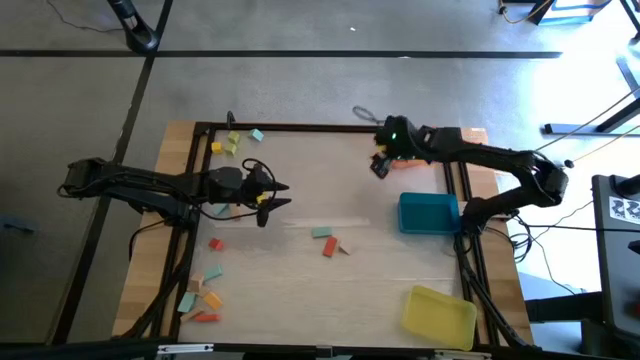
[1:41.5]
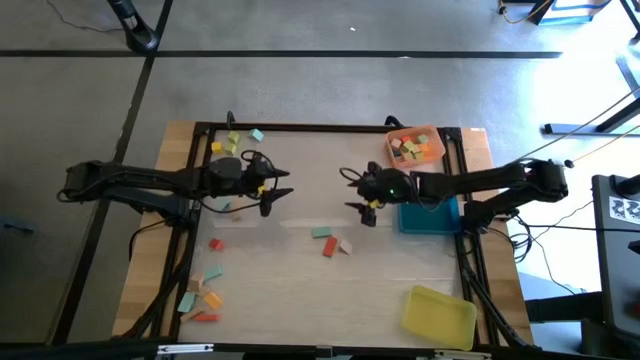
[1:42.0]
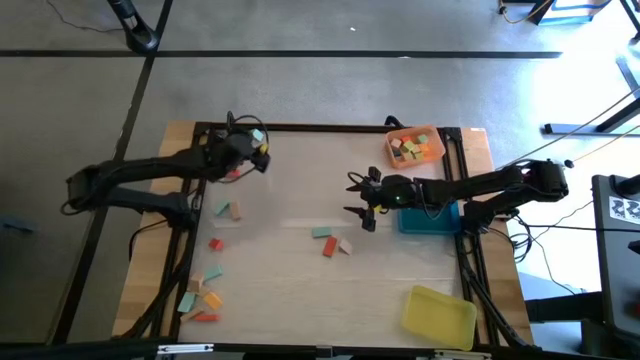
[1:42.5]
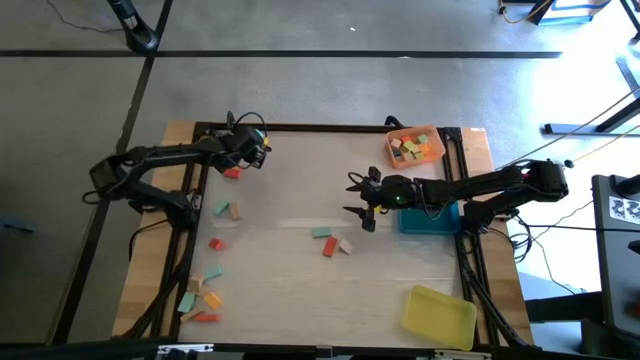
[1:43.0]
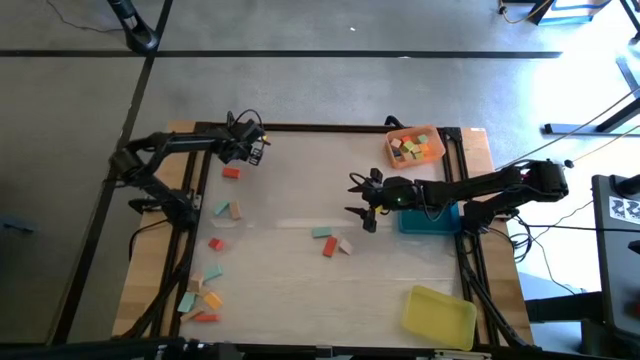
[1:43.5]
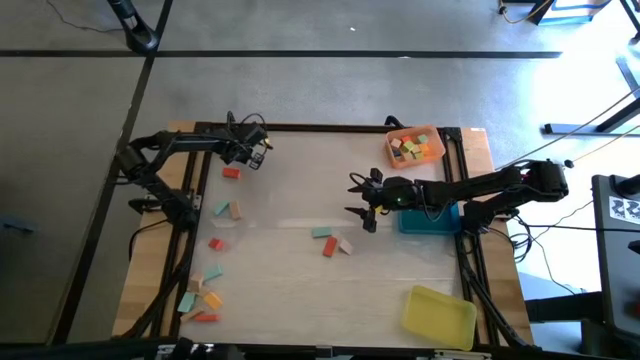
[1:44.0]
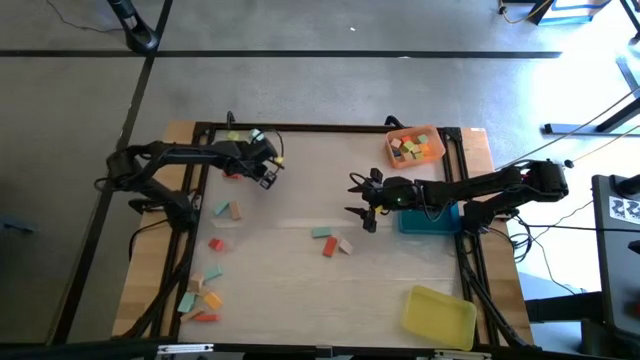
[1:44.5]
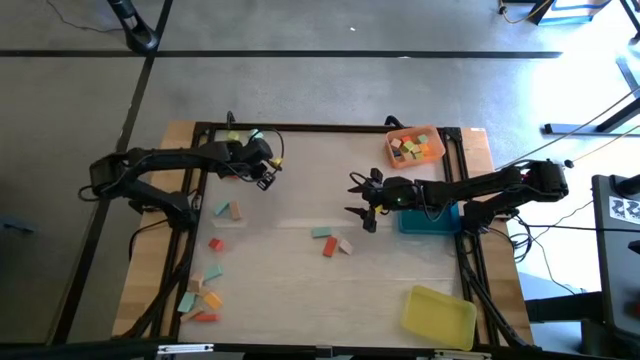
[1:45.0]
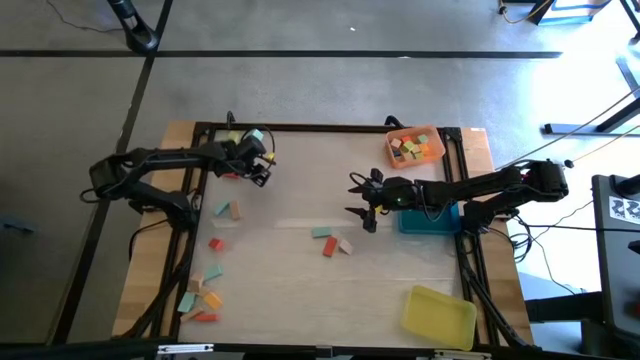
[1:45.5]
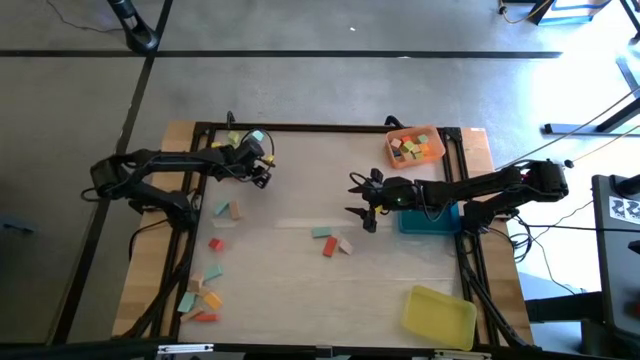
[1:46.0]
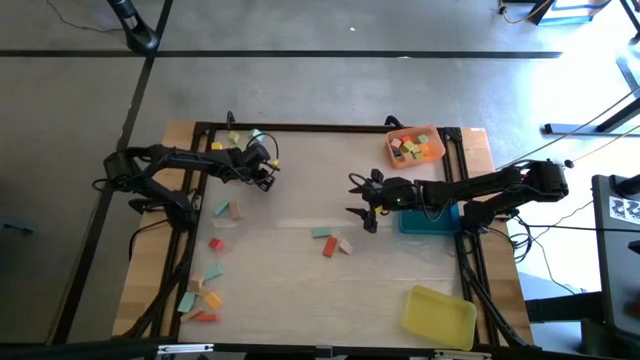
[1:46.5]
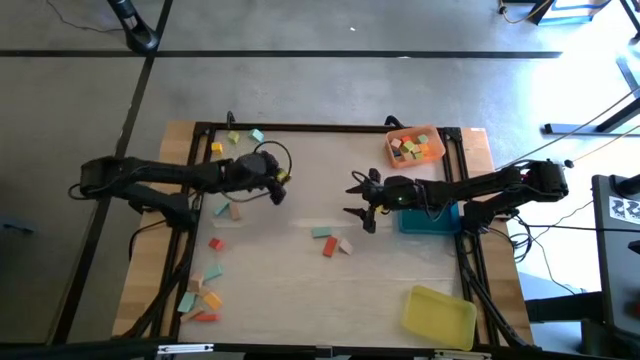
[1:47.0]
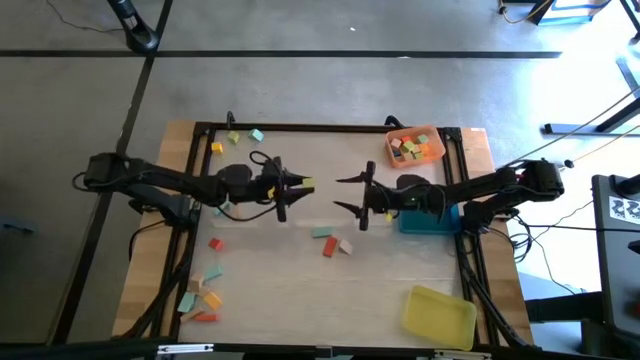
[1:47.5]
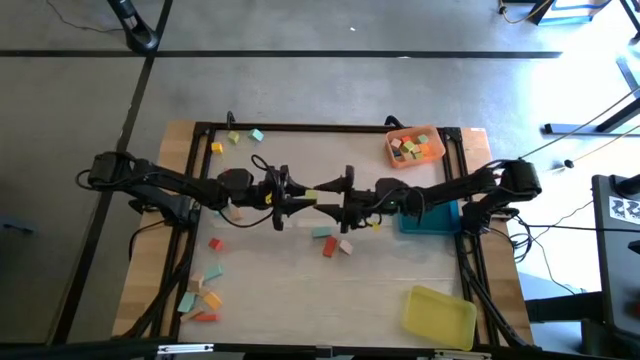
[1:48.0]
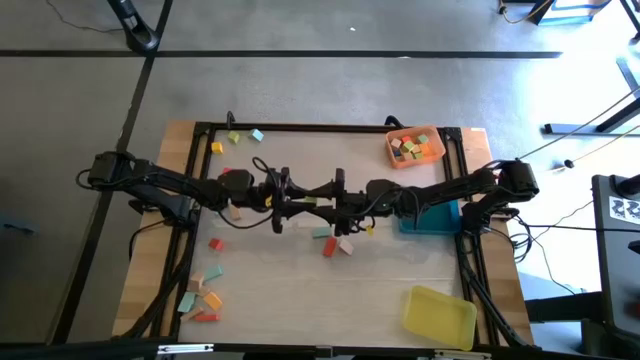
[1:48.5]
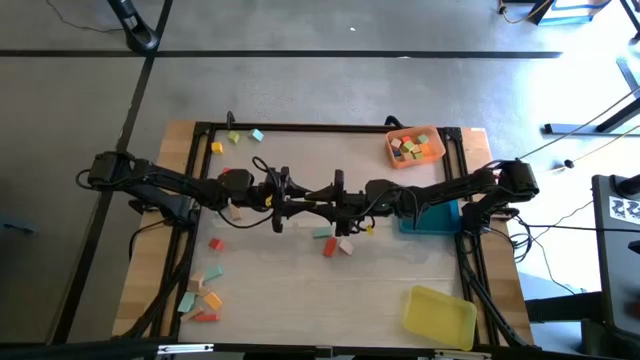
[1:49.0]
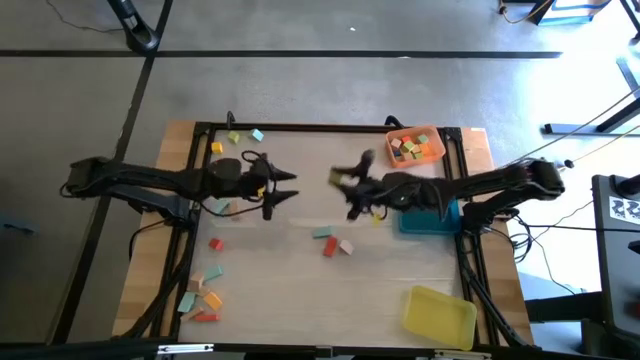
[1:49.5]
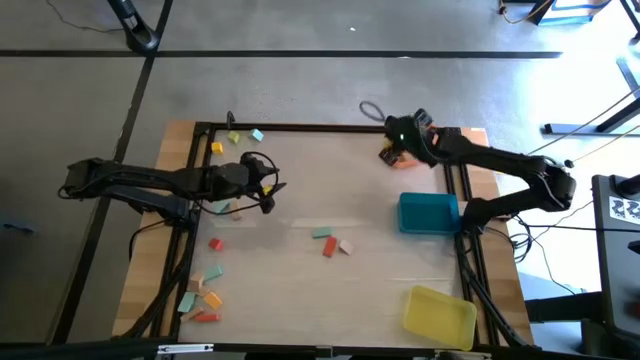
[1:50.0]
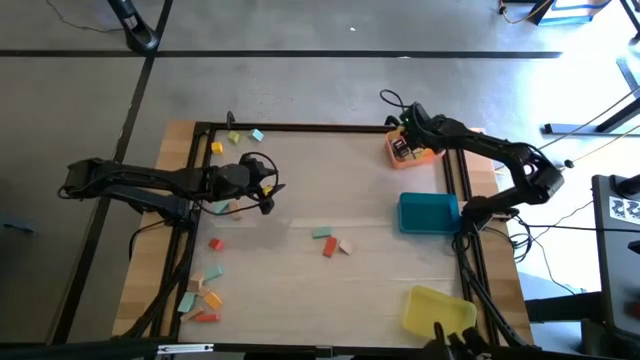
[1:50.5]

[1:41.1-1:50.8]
Task: Sort blocks by size
Put the green cube block into the orange bin

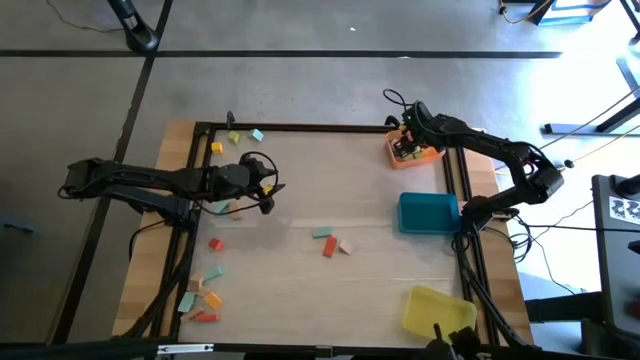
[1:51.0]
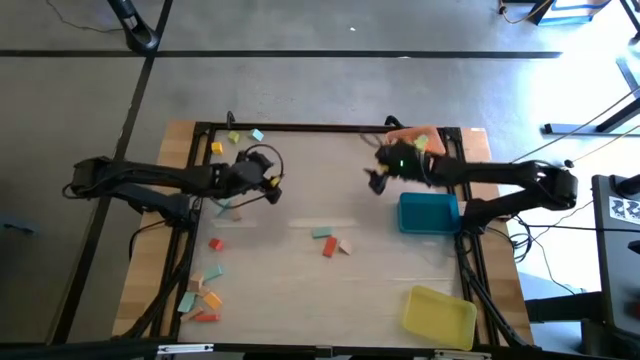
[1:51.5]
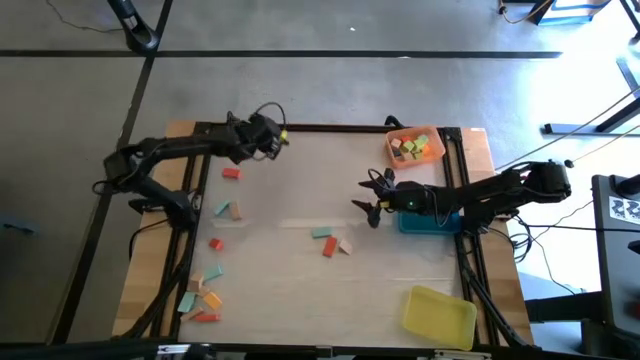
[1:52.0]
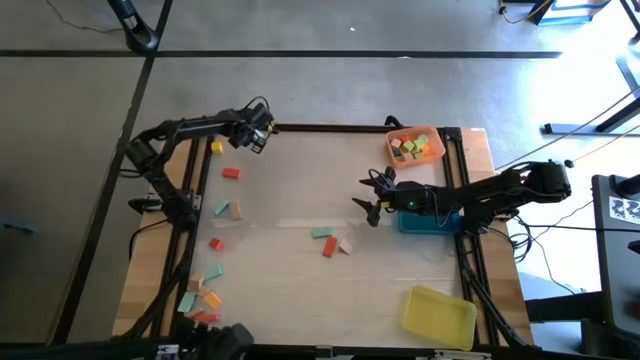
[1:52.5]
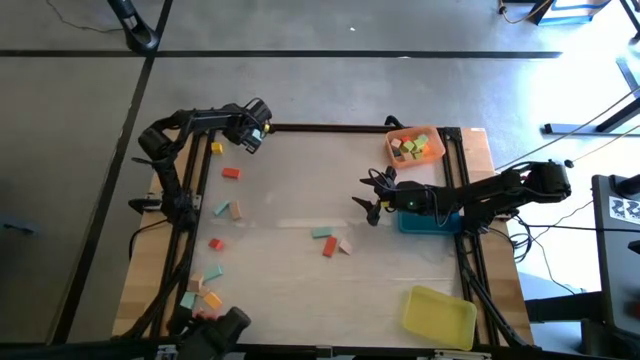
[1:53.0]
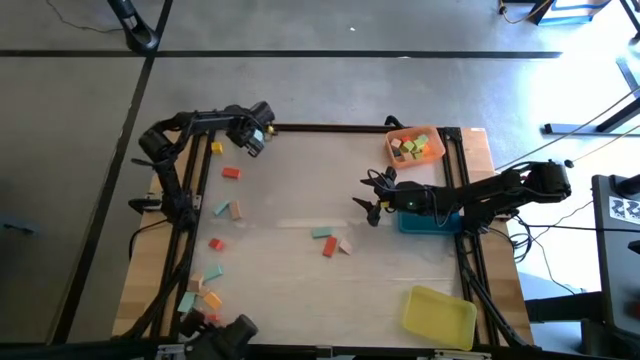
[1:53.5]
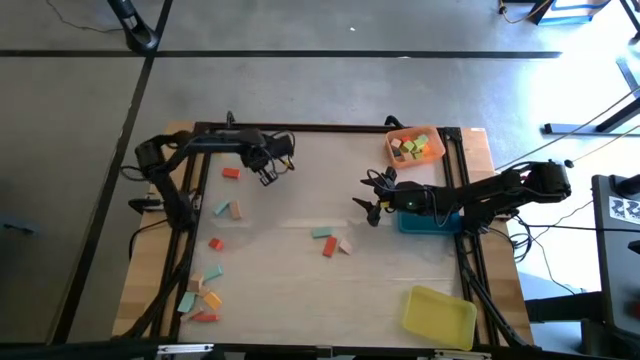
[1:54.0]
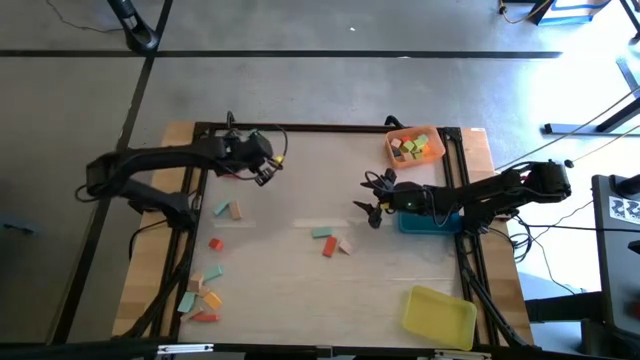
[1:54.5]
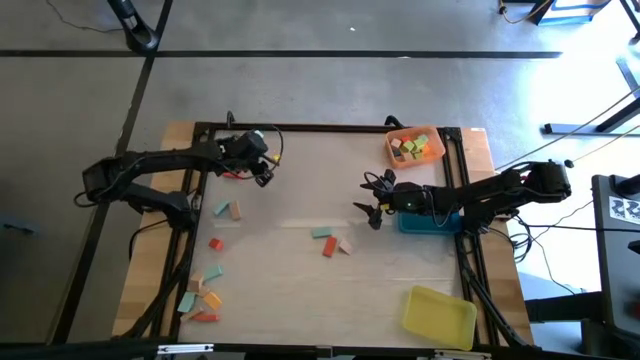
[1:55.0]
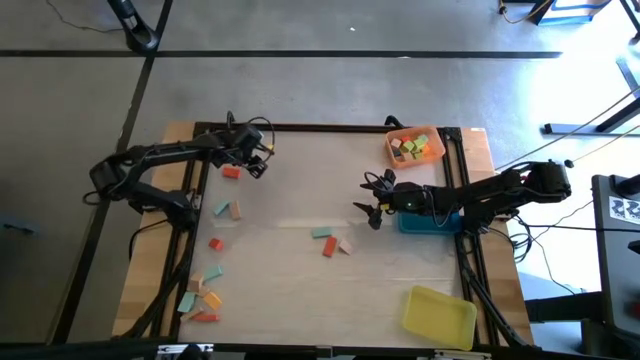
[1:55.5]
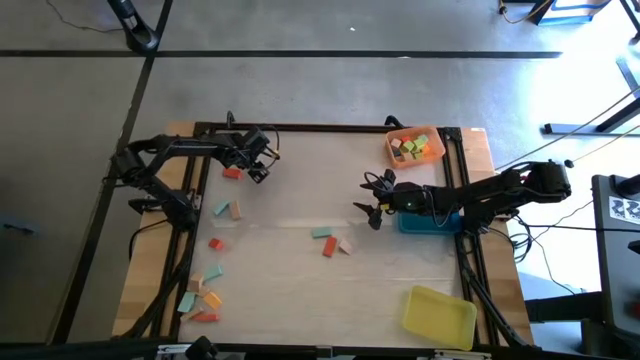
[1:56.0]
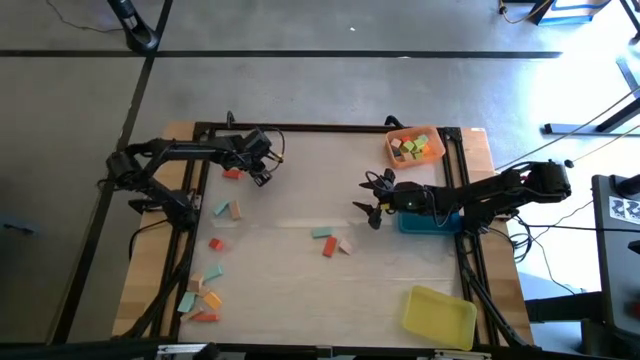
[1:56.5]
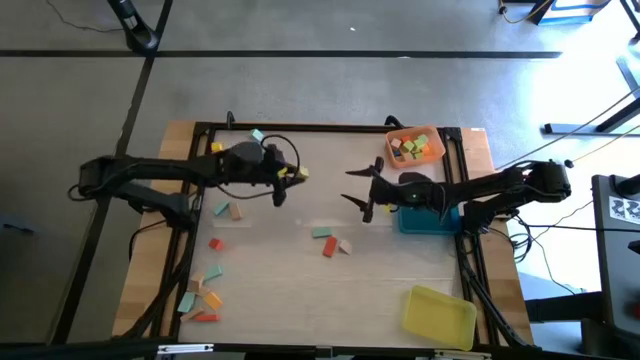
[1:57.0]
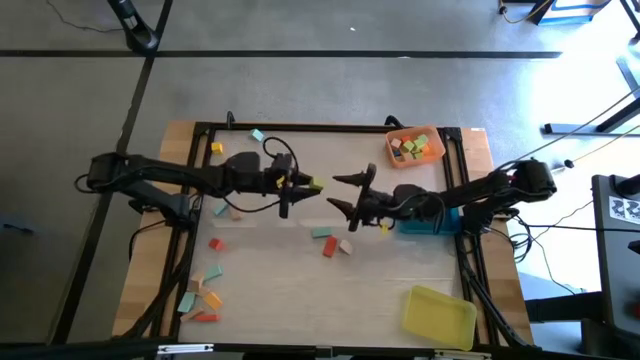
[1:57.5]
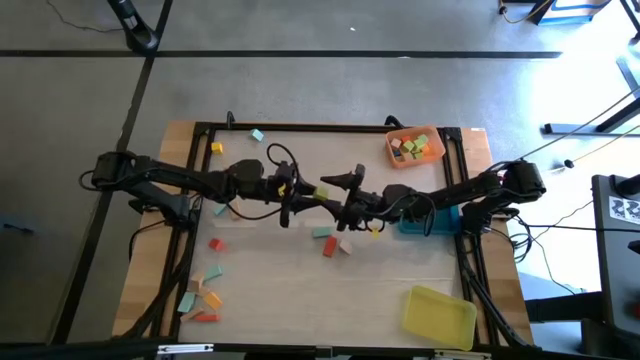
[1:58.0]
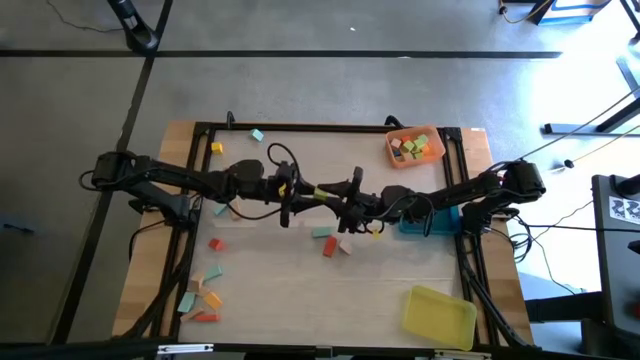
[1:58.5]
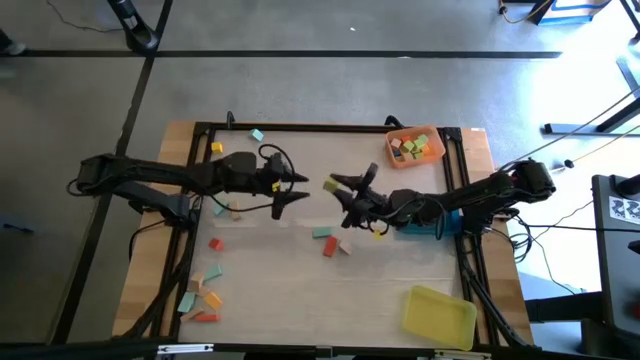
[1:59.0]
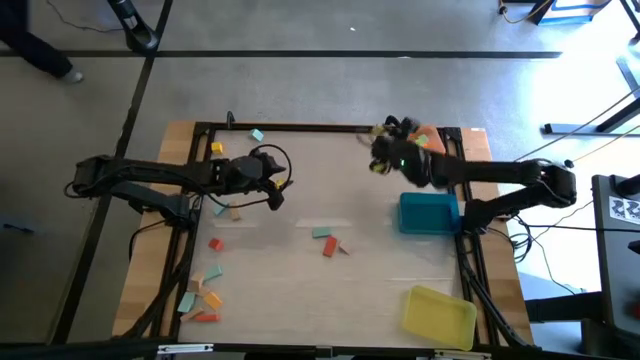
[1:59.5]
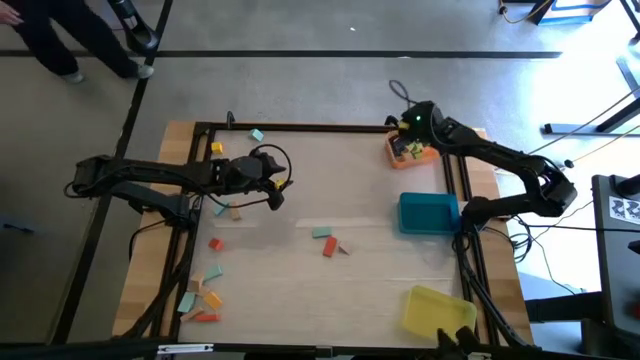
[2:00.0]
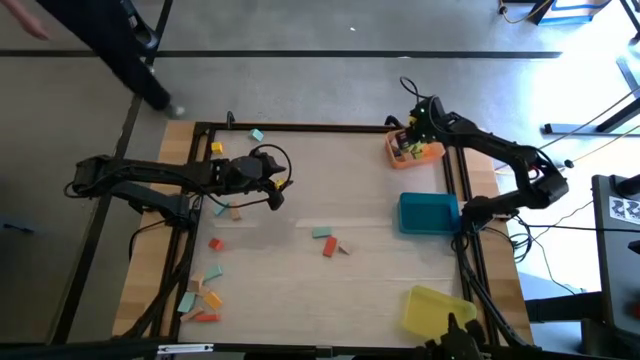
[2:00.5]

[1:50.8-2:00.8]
Put the green cube block into the orange bin

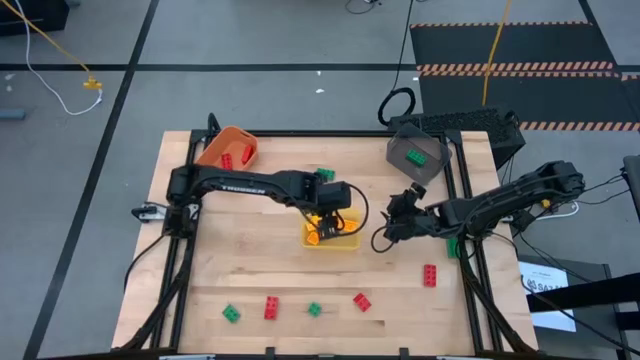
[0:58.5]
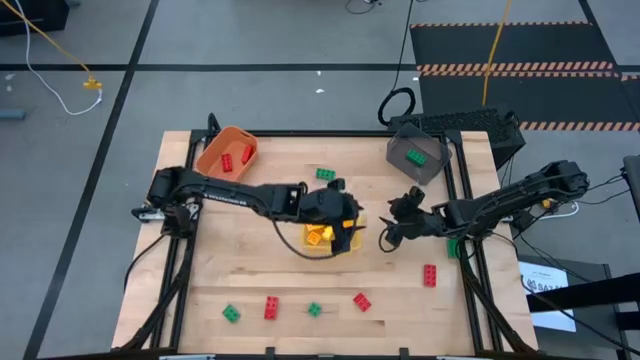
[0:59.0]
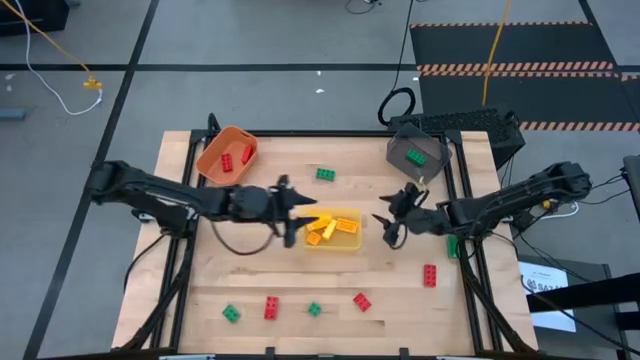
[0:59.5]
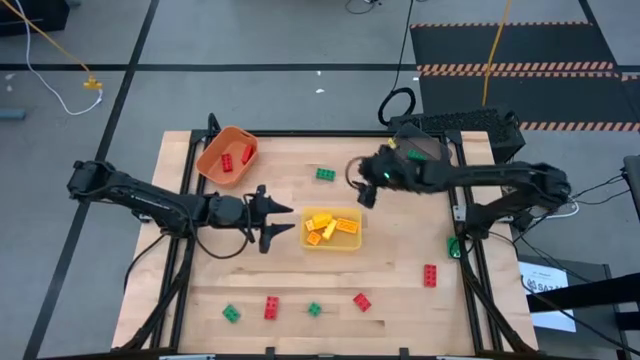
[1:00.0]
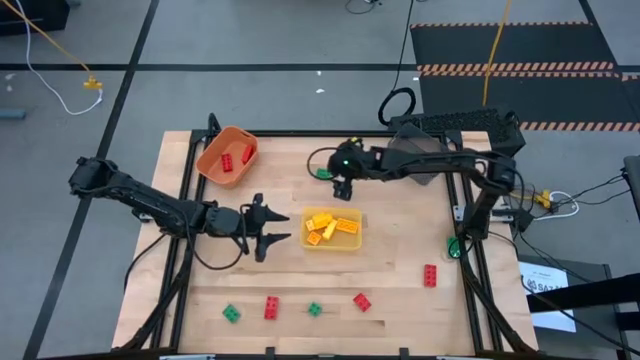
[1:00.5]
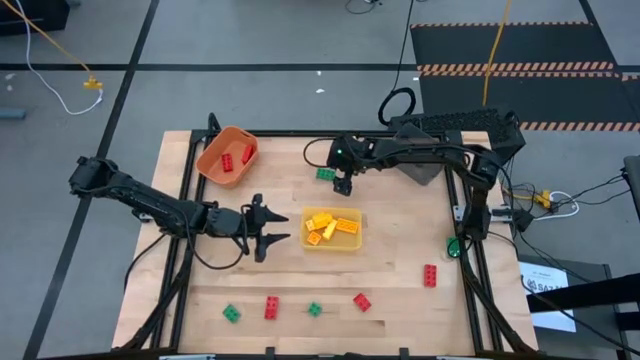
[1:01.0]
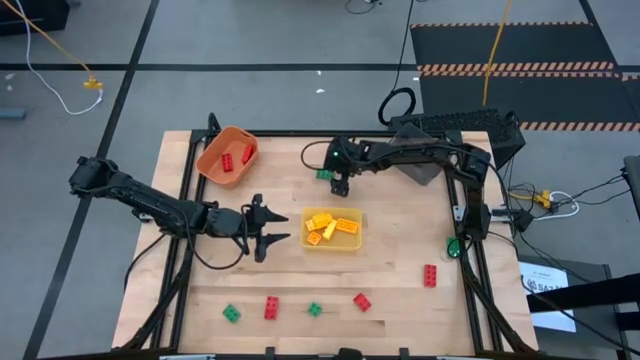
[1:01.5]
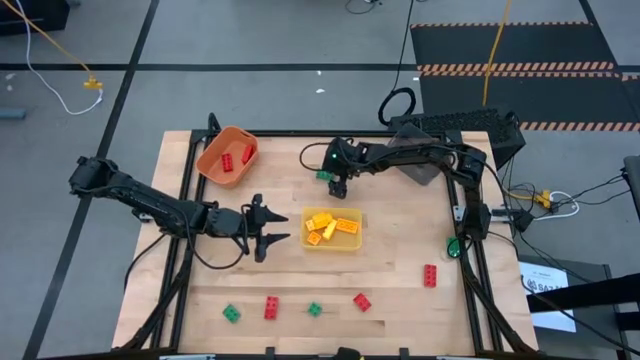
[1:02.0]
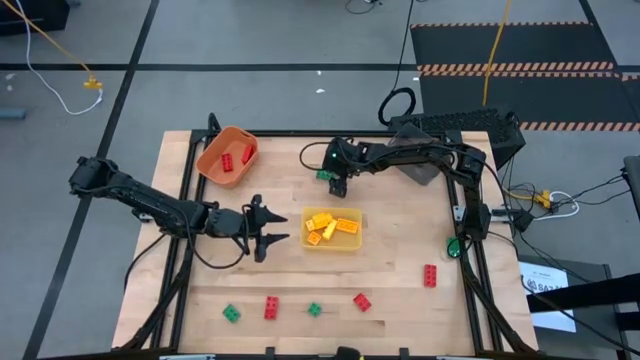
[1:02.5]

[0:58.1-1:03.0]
Task: Sort & place blocks by color
Put the top center green 8-stud game piece into the black bin
